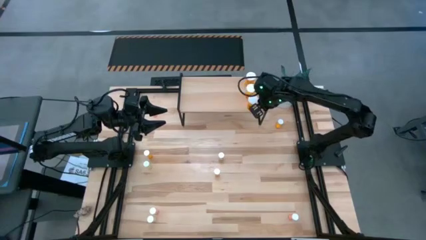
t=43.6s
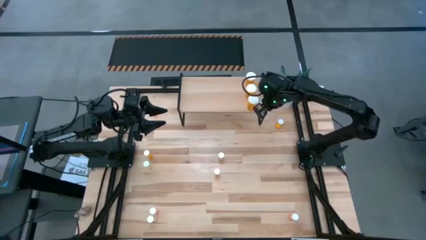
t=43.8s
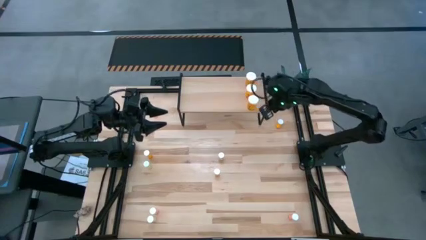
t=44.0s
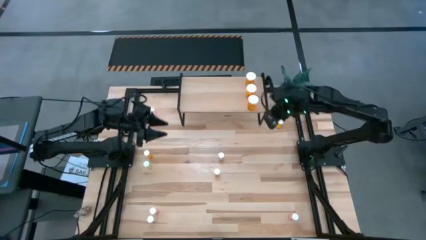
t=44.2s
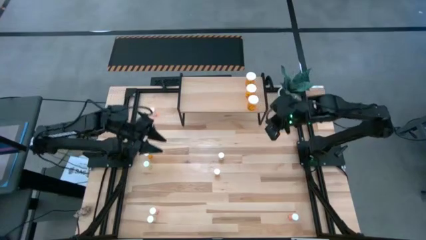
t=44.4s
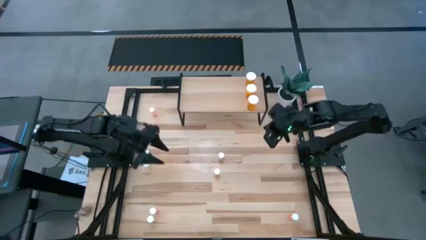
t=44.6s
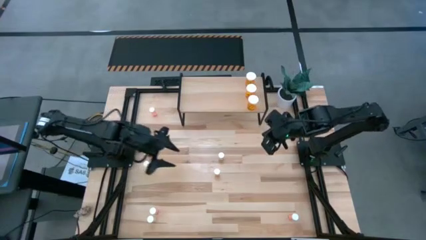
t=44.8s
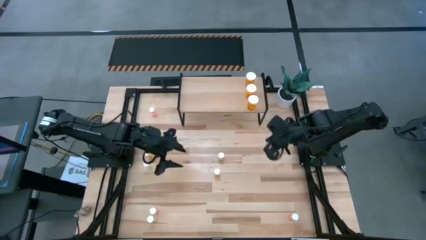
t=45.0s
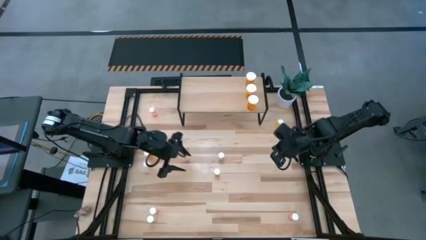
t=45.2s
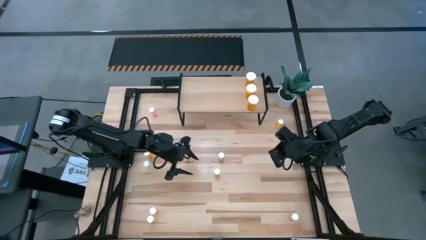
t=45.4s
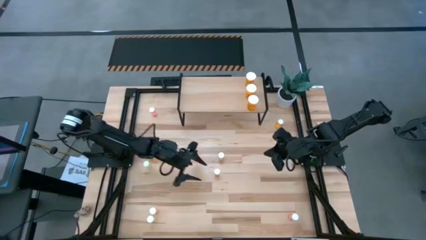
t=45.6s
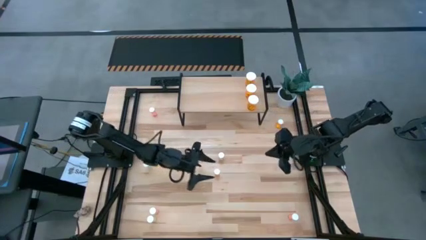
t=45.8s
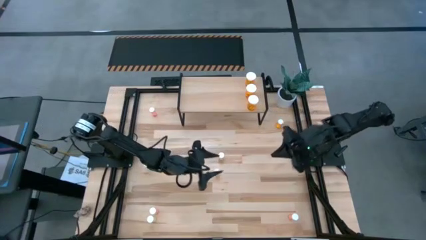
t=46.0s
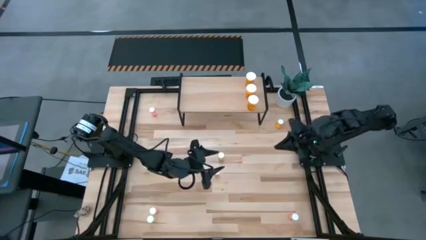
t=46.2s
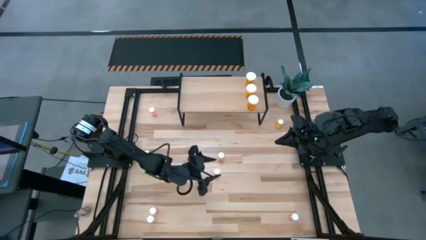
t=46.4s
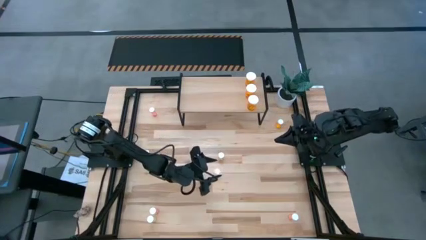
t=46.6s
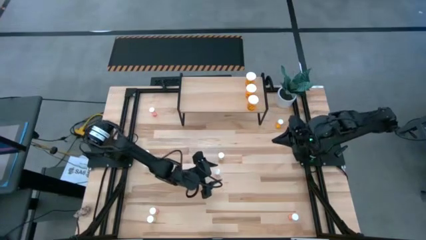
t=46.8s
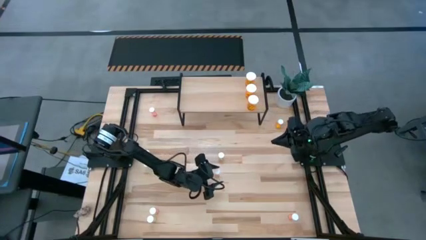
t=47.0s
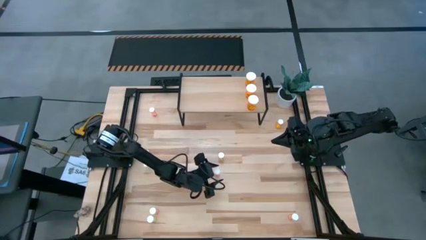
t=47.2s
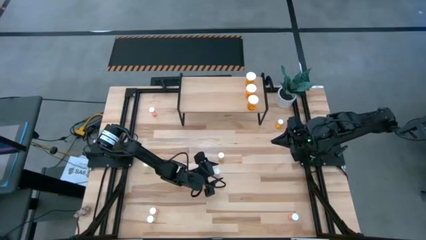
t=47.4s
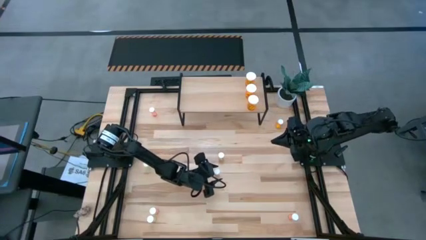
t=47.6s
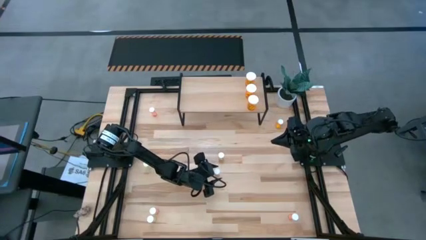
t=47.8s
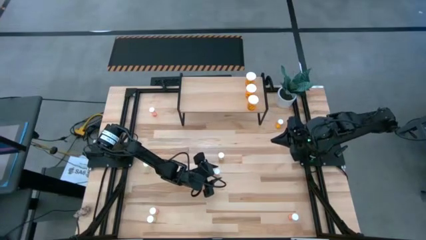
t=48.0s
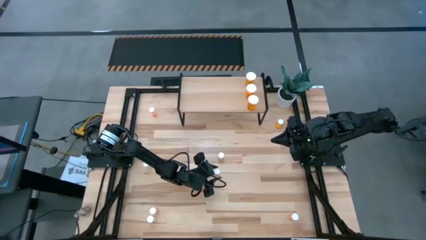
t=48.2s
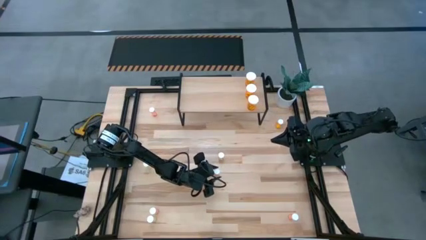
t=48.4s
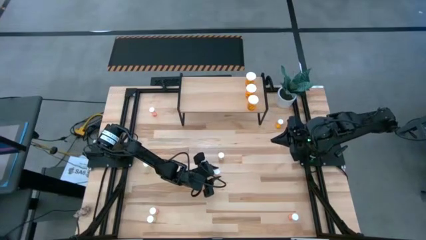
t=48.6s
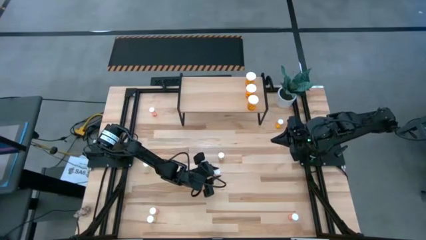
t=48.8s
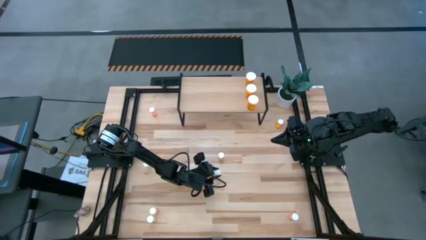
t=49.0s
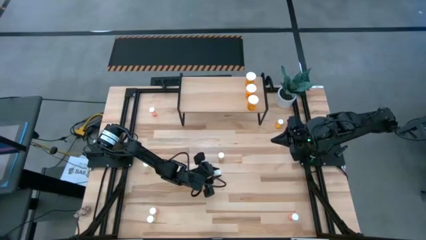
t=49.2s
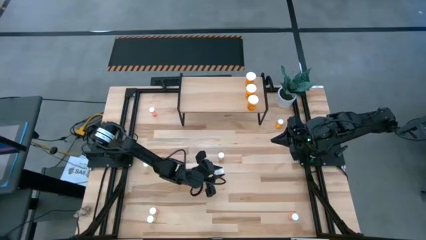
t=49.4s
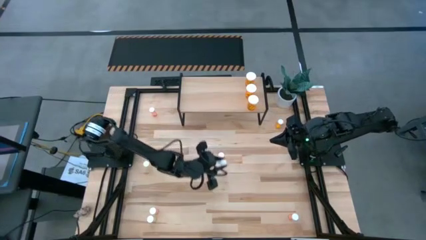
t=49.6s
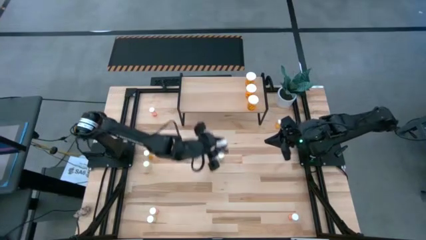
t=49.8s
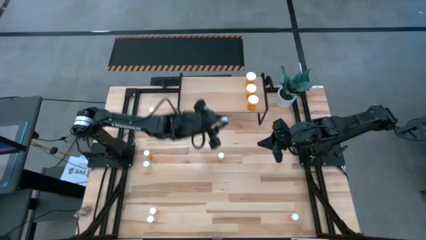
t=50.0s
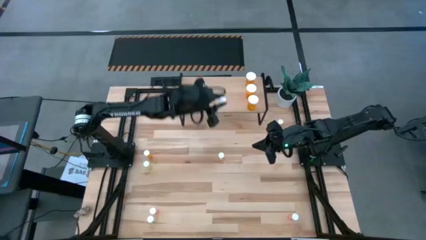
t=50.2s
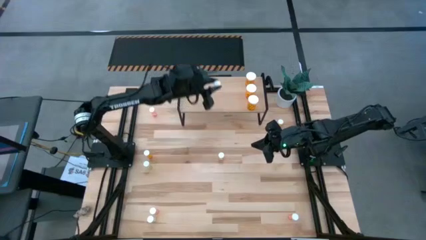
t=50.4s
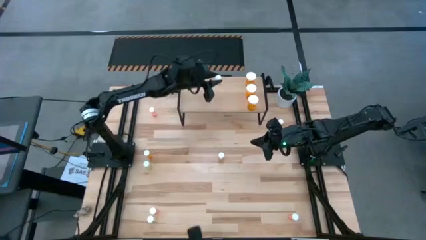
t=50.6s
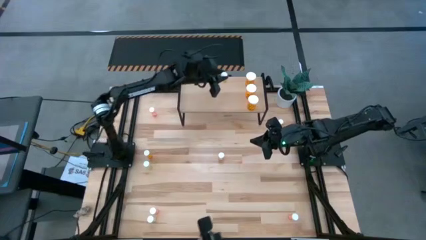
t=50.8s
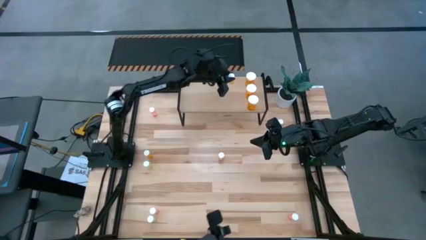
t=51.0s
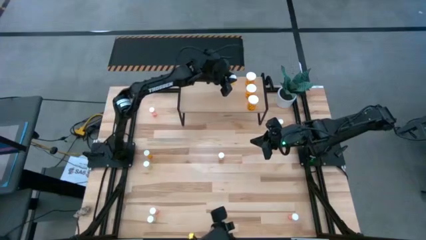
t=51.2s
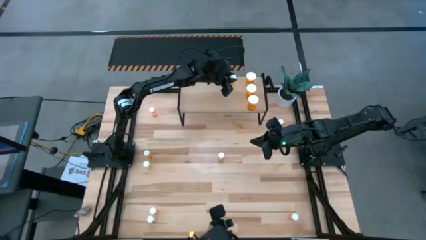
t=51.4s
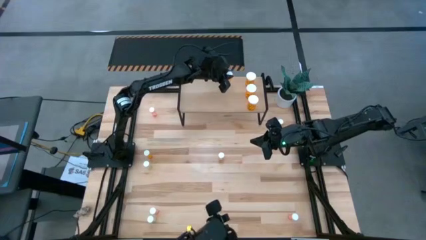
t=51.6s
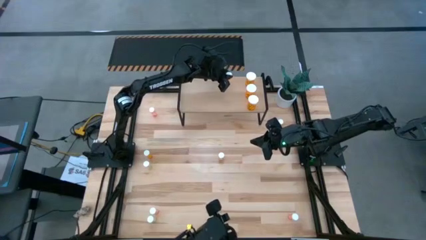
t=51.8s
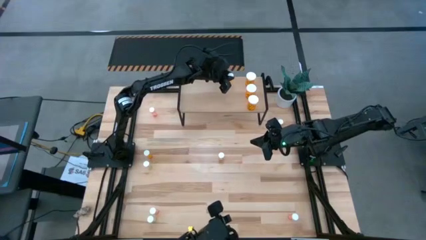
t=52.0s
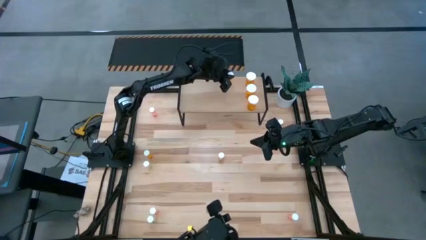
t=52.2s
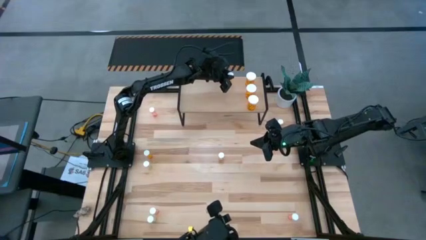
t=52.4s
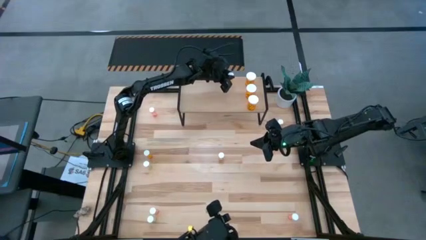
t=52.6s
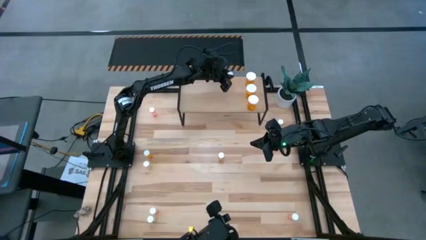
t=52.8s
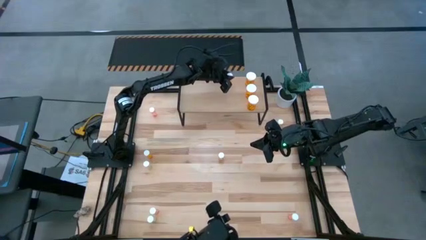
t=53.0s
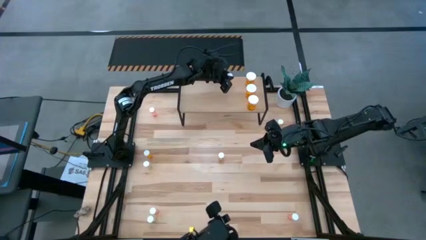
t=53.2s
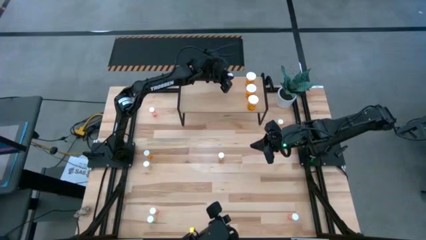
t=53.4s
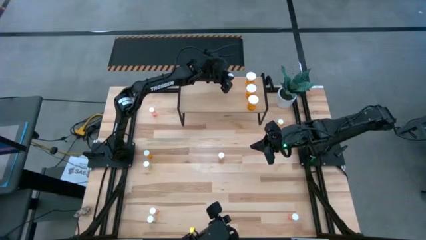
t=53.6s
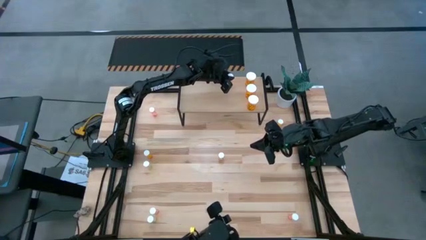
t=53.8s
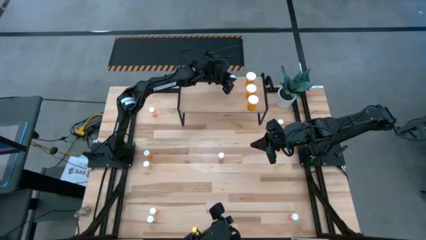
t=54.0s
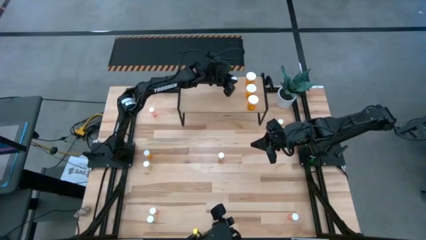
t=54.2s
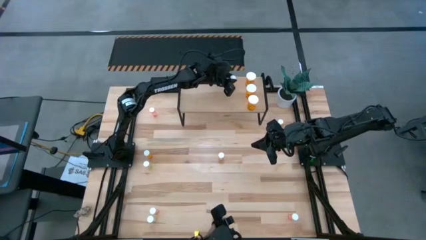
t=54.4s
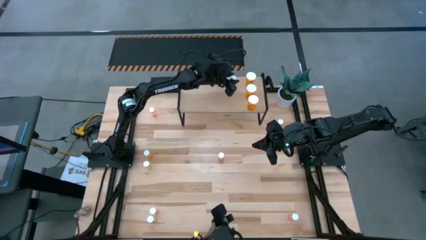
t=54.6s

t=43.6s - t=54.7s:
Task: Pick and place medicine bottles onto shelf by color
Put the center bottom small orange pill bottle to the top of the shelf
